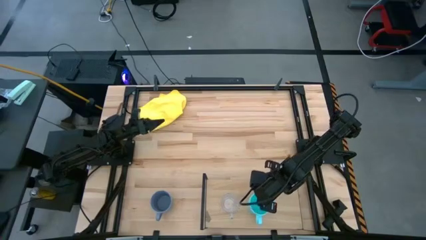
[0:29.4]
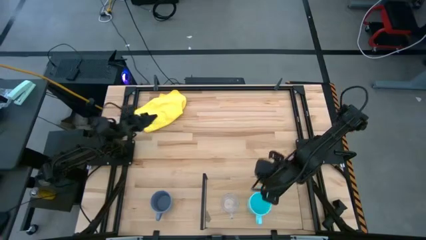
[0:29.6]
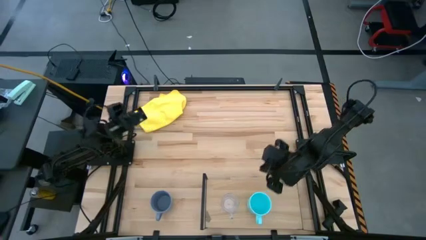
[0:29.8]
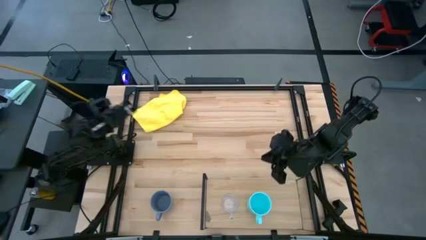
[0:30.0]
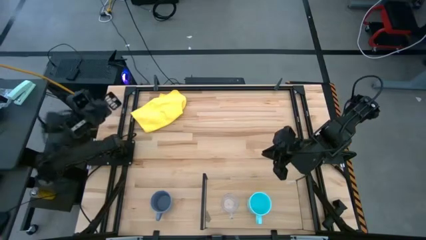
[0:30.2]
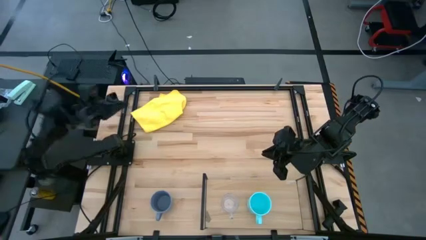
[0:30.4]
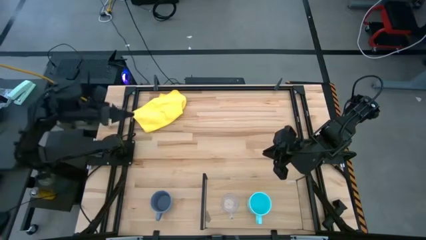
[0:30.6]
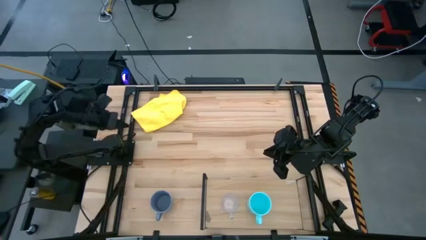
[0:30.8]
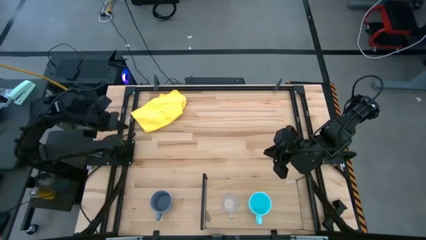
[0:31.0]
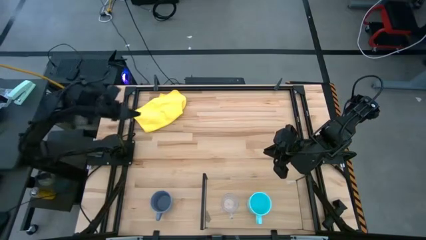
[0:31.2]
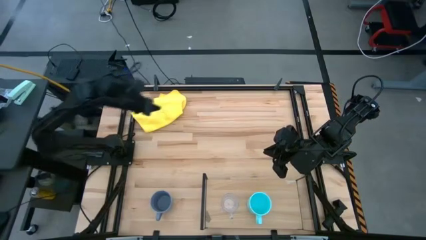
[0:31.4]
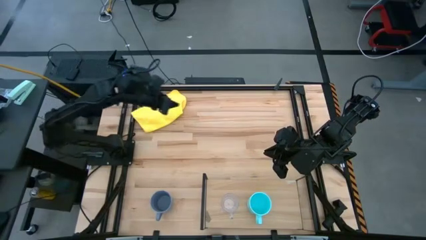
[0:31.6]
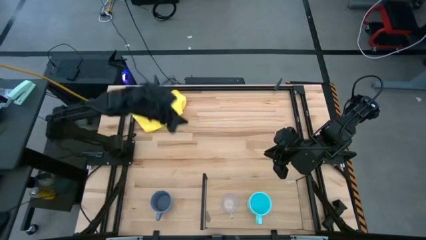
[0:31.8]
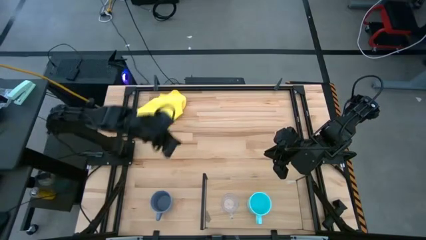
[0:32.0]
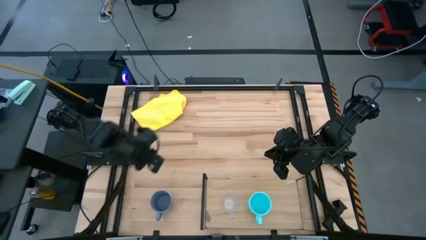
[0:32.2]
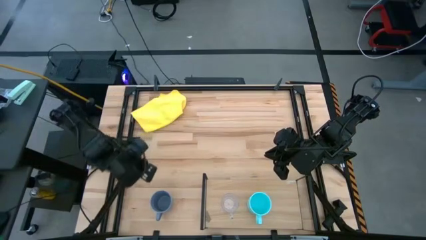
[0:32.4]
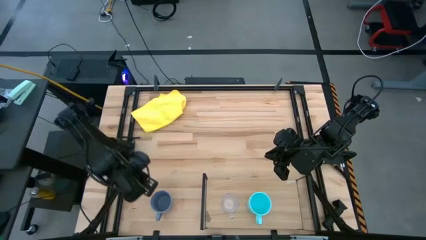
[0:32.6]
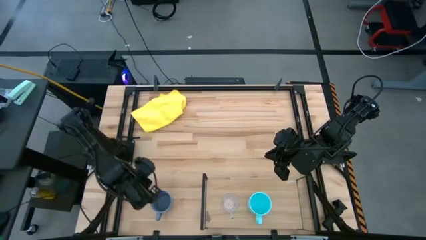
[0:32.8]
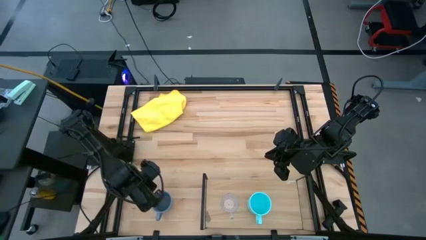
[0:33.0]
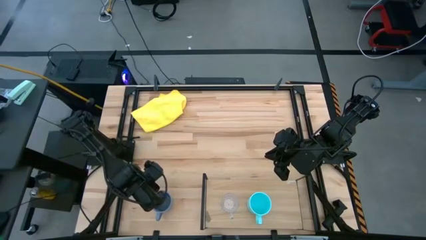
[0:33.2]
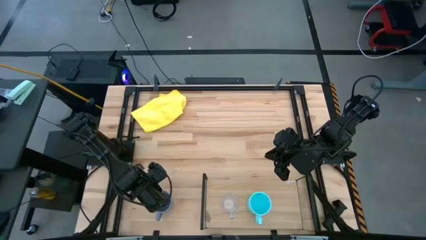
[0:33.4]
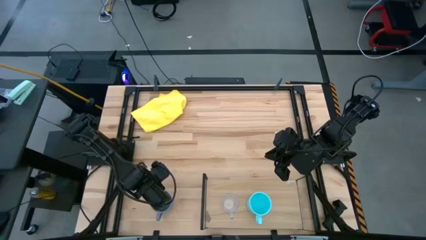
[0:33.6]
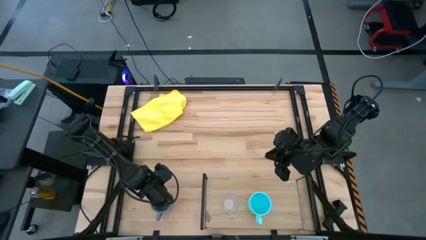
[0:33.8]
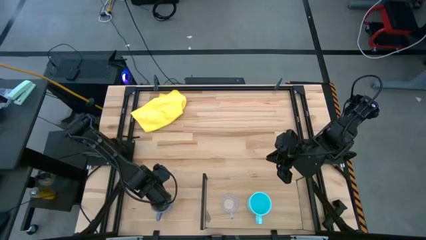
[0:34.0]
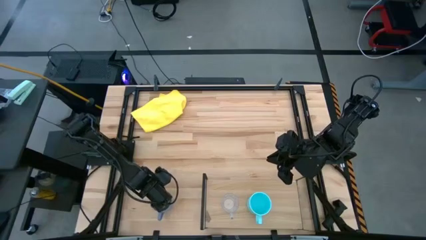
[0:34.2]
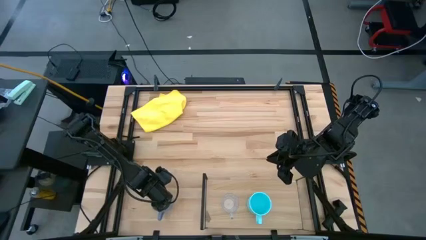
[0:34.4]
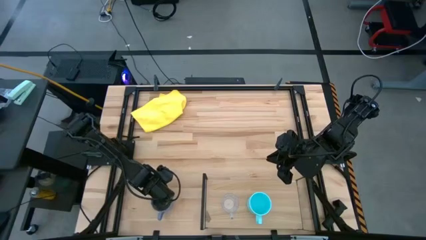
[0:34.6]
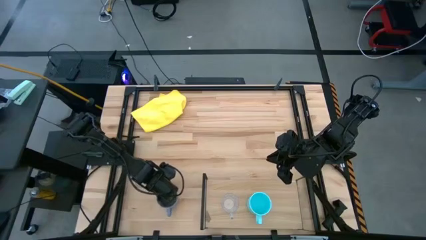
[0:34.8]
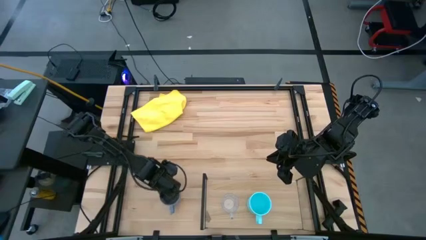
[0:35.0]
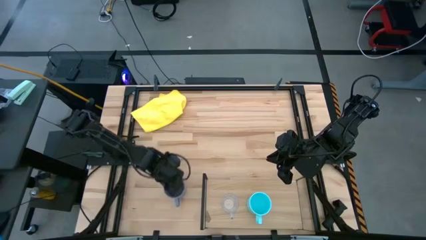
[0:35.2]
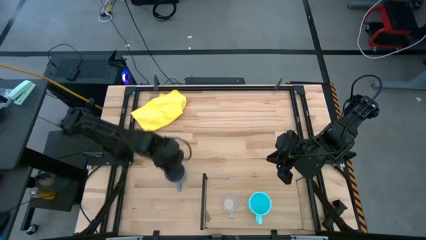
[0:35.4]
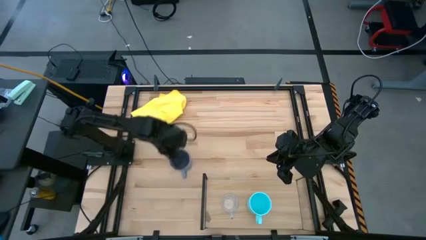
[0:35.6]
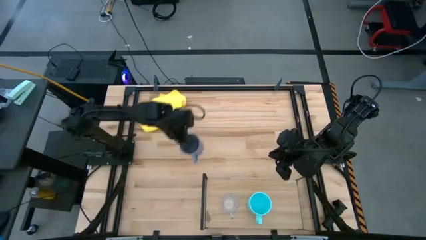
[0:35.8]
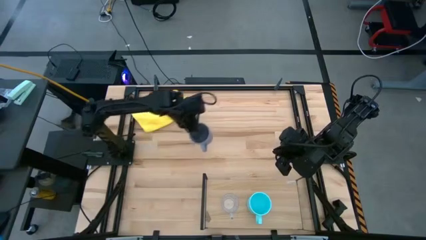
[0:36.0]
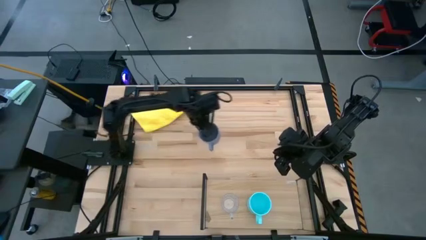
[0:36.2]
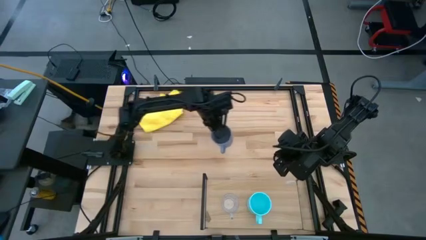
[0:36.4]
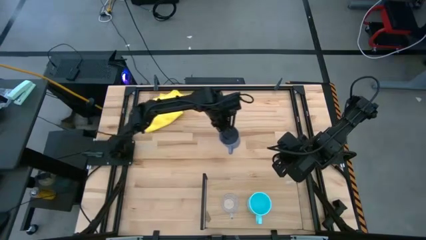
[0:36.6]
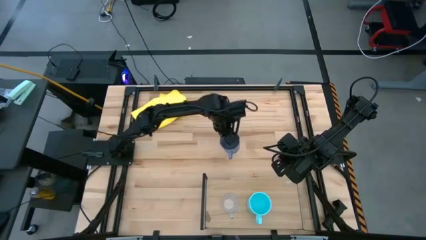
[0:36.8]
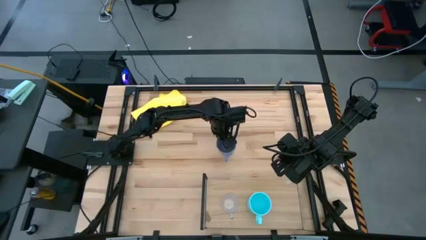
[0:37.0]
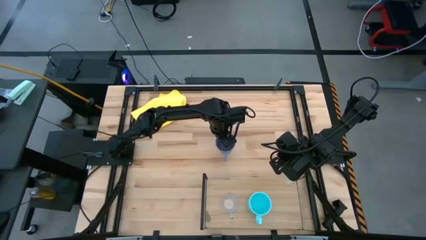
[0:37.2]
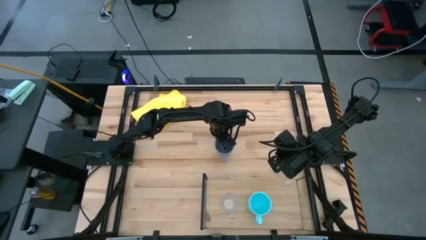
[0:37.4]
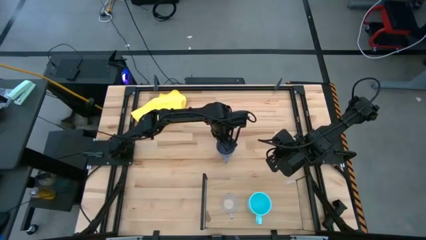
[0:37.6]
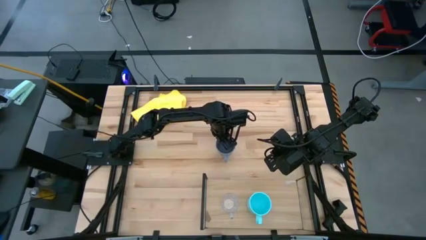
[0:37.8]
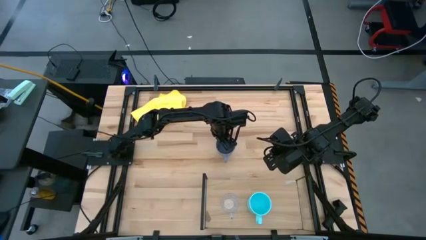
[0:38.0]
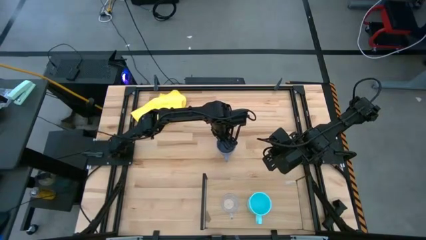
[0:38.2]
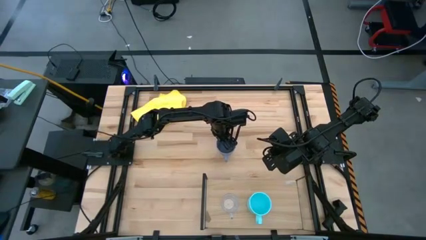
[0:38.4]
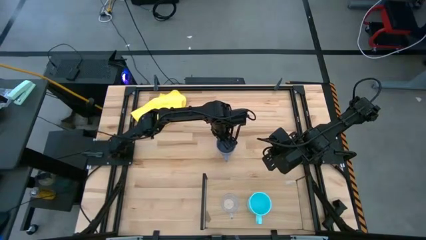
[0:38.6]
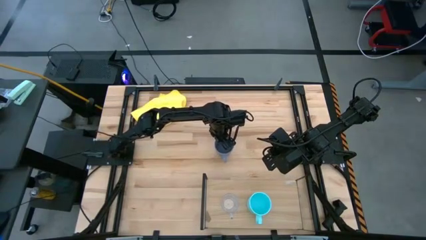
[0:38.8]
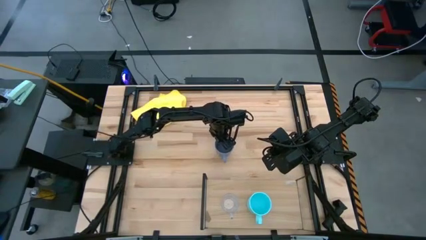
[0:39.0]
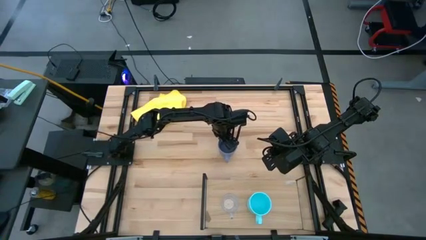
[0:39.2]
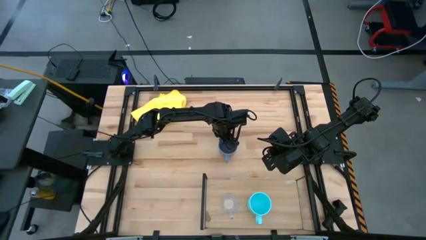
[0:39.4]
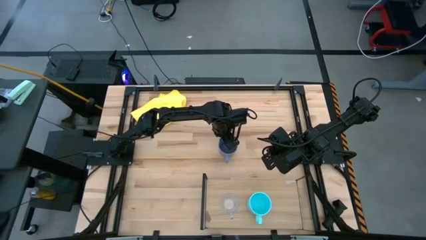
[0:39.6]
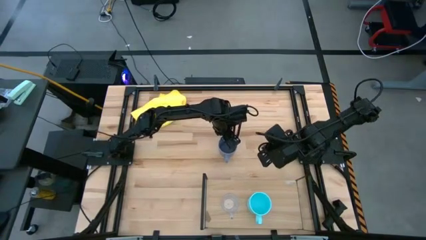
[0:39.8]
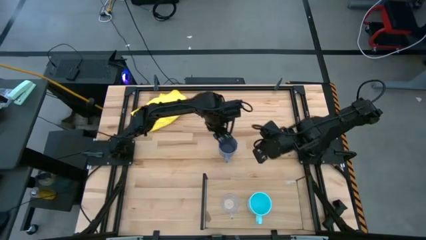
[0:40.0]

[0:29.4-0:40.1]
Task: Stack small to large cups/mugs on shelf
Put the violet mug on the shelf
